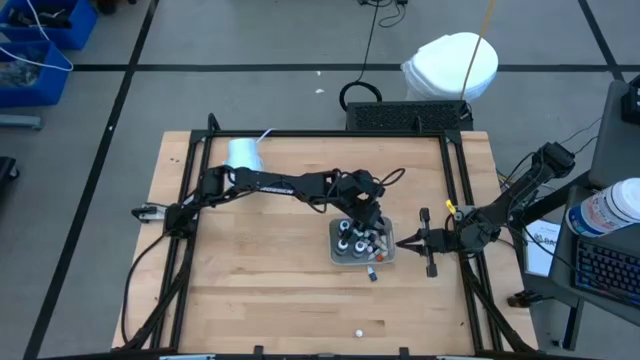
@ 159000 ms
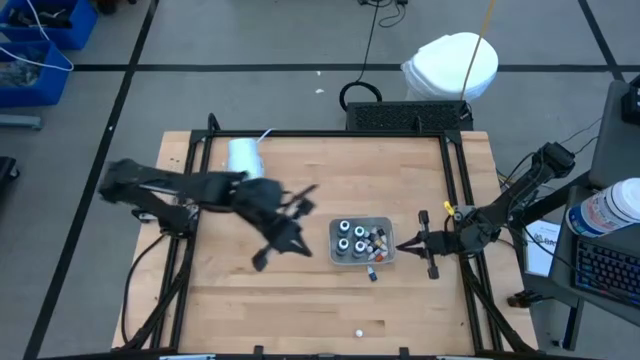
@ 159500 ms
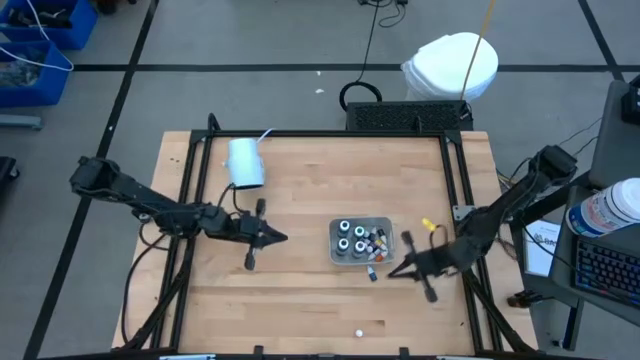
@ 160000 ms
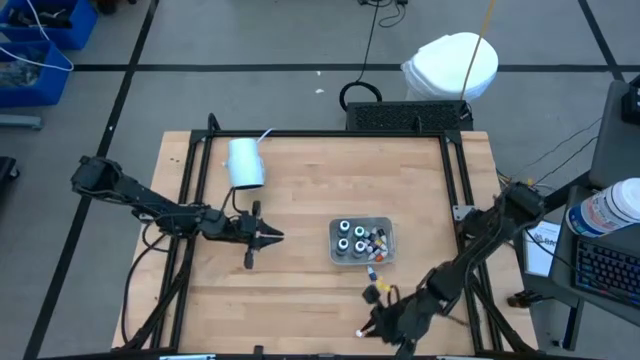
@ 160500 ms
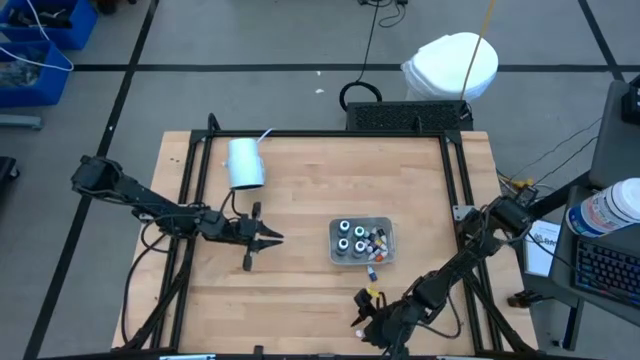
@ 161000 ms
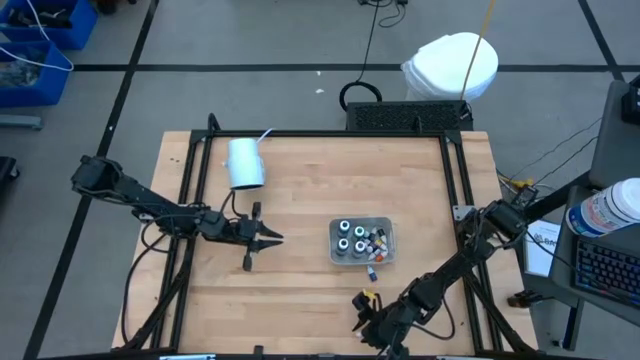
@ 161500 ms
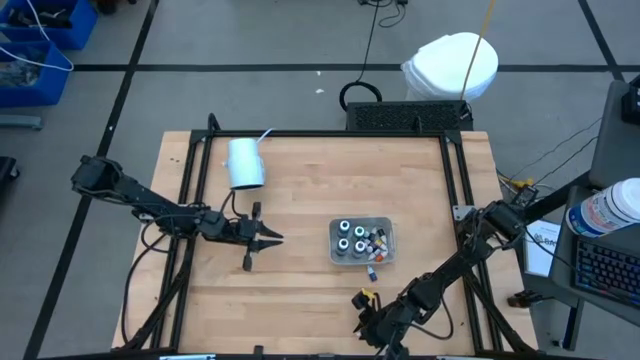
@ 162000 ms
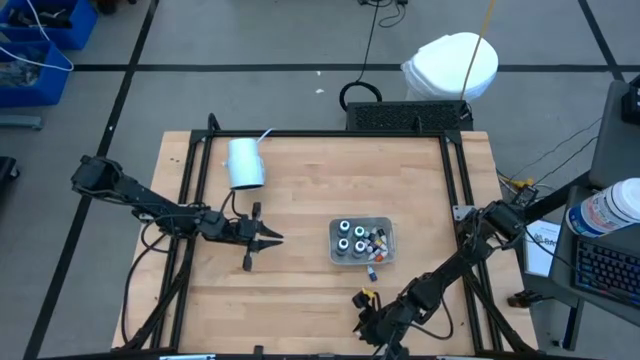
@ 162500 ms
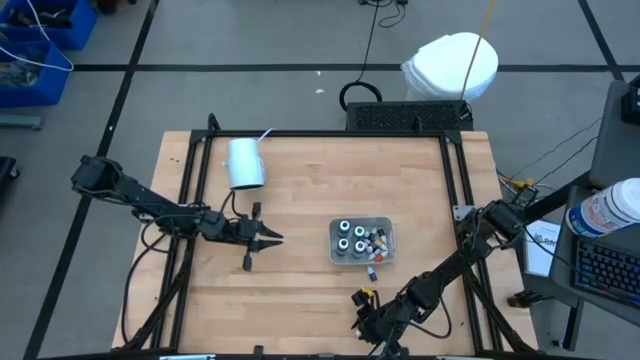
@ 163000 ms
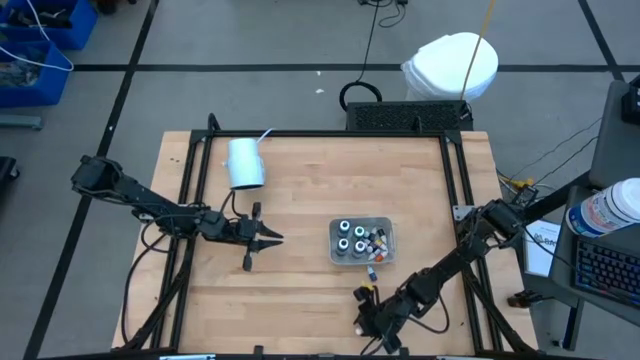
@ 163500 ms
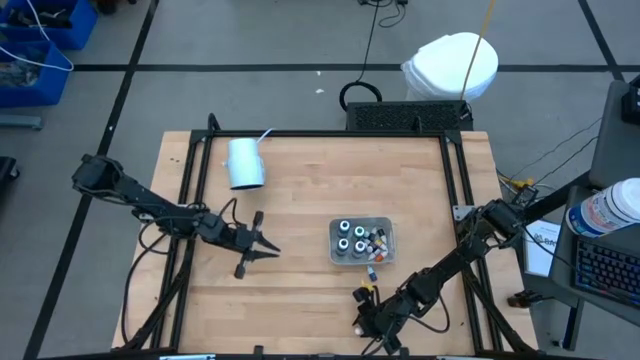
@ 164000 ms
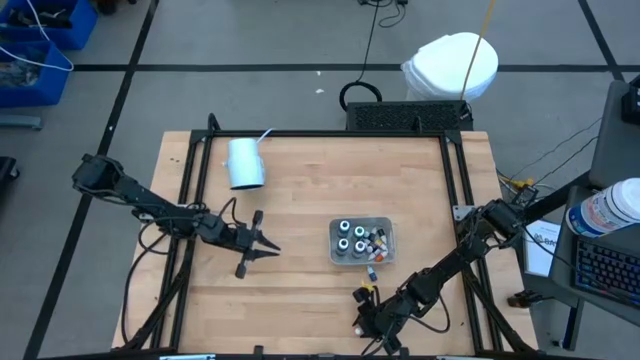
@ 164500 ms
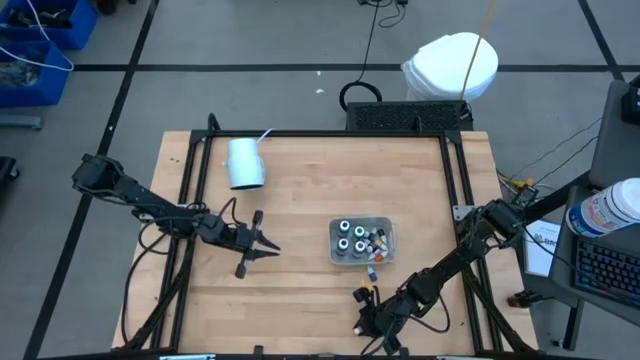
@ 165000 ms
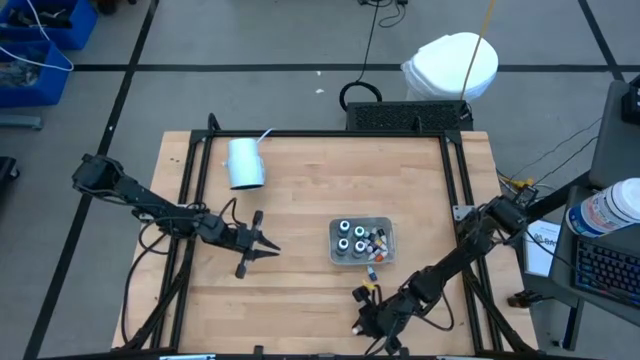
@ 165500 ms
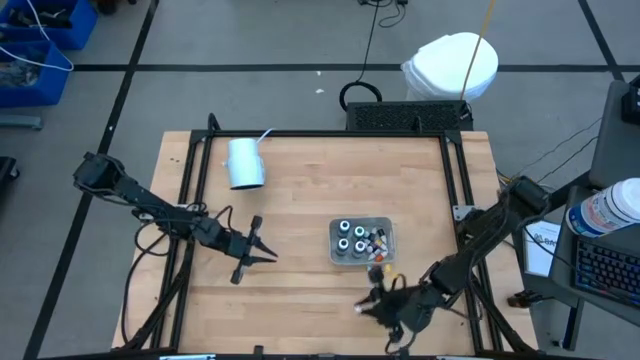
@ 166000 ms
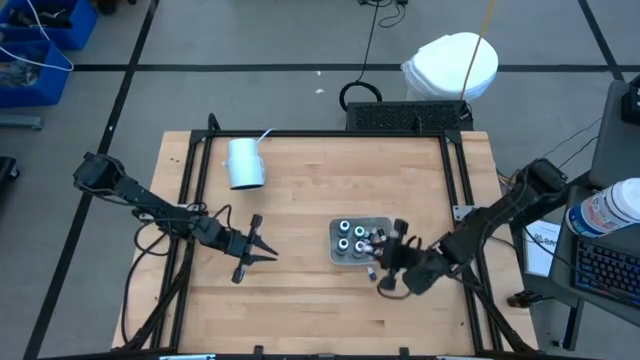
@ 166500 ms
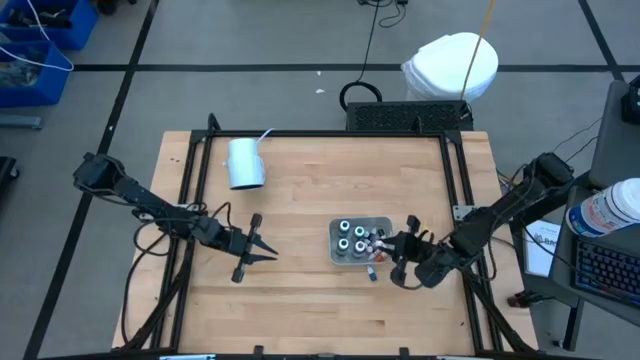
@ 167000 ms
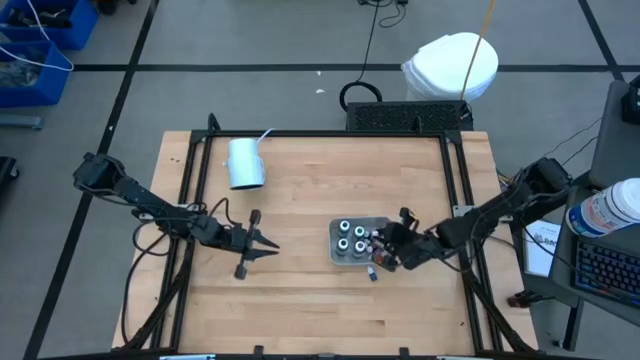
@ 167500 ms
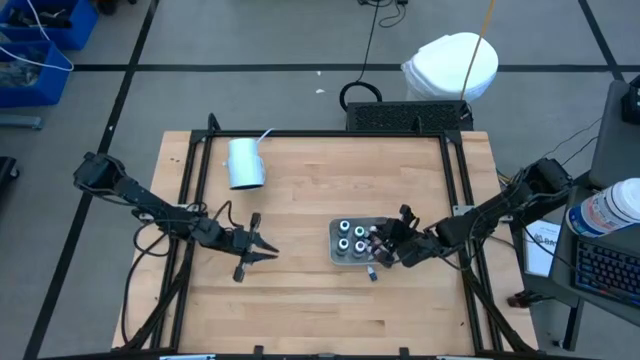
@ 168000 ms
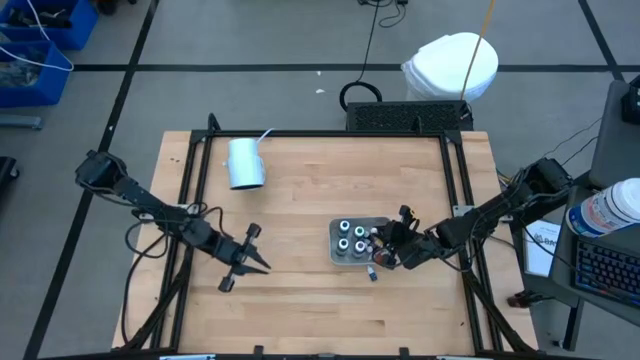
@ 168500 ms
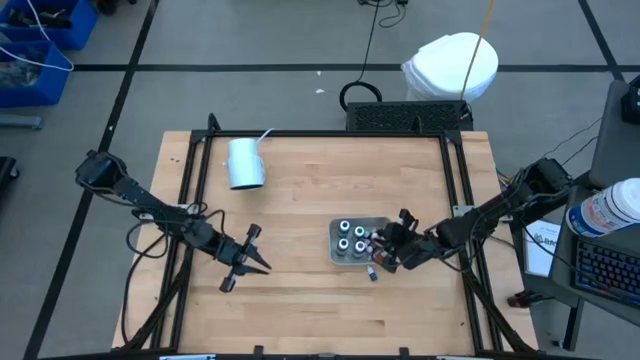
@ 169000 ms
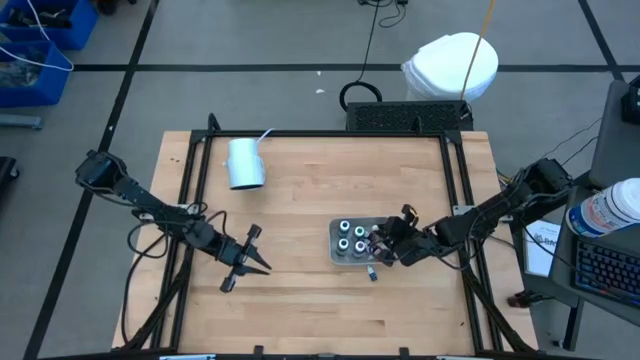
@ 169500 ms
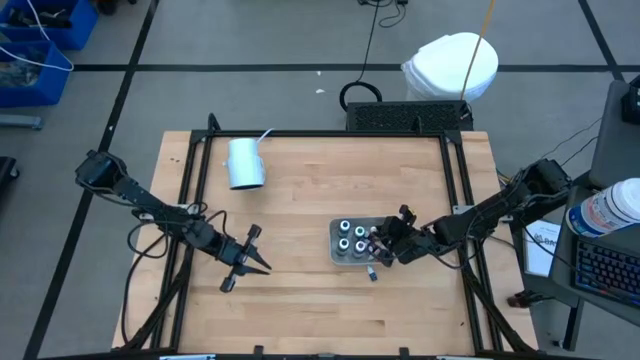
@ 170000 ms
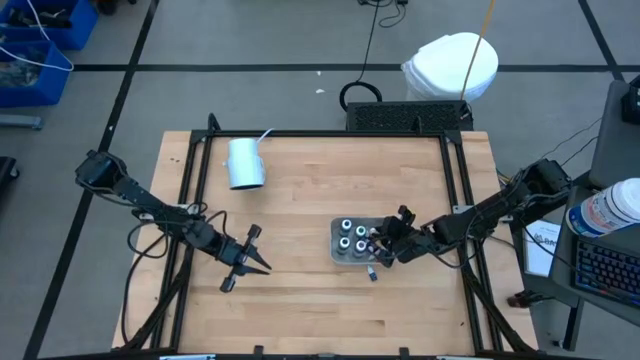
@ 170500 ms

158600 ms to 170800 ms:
Task: Pick & Place food coloring
Put the orange food coloring bottle into the gray bin

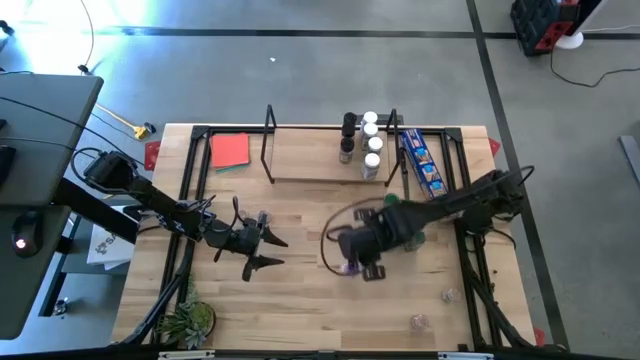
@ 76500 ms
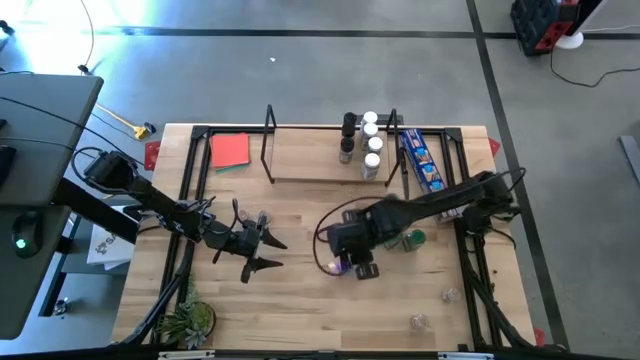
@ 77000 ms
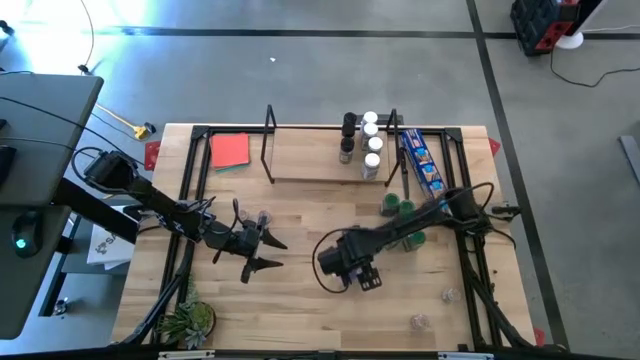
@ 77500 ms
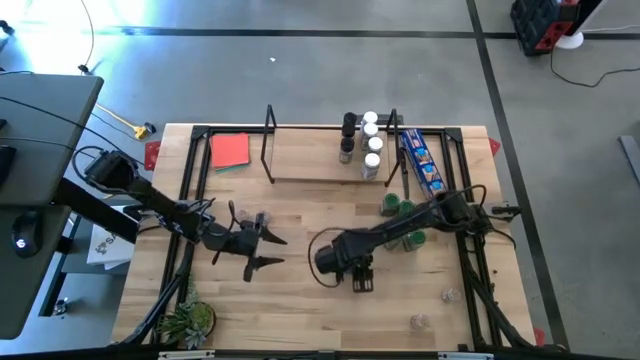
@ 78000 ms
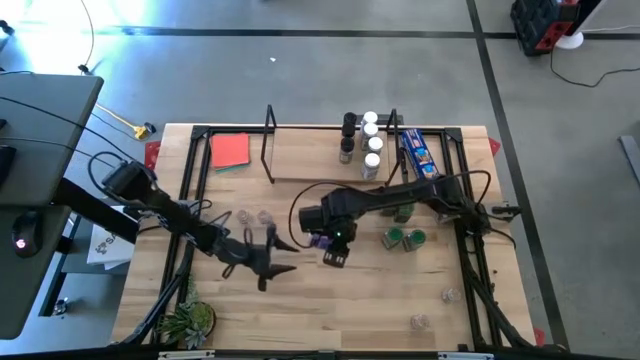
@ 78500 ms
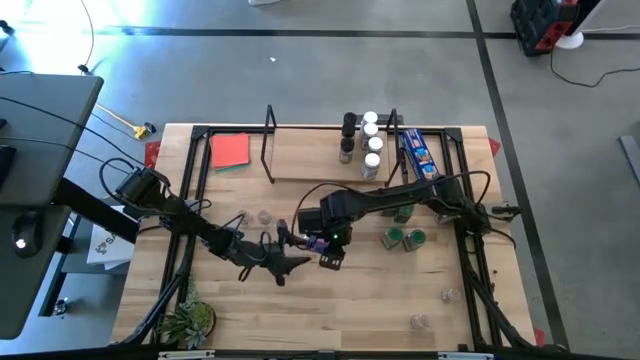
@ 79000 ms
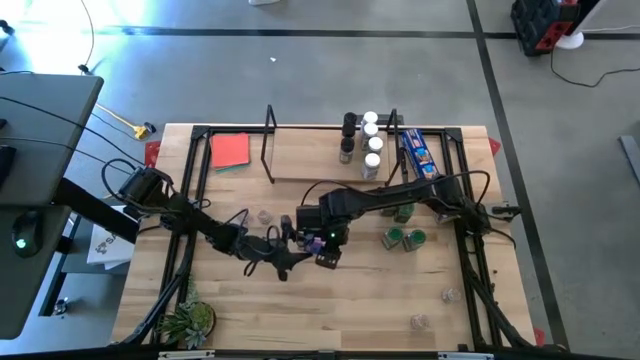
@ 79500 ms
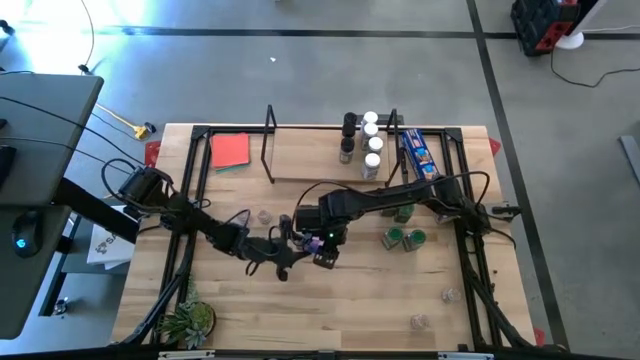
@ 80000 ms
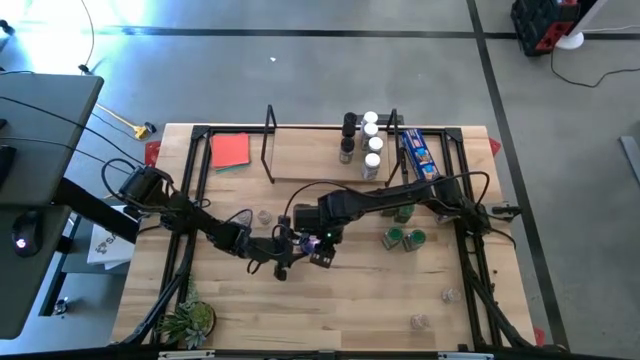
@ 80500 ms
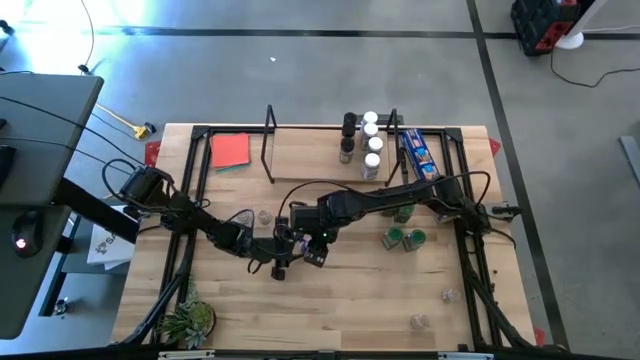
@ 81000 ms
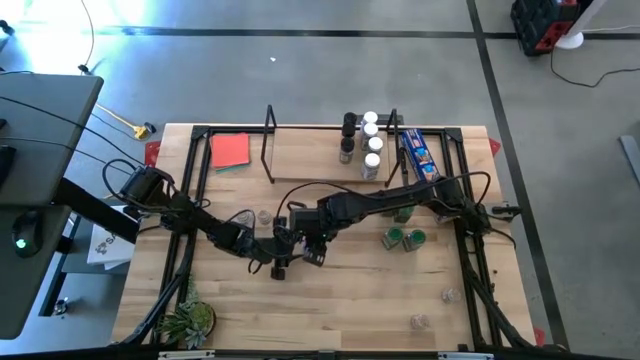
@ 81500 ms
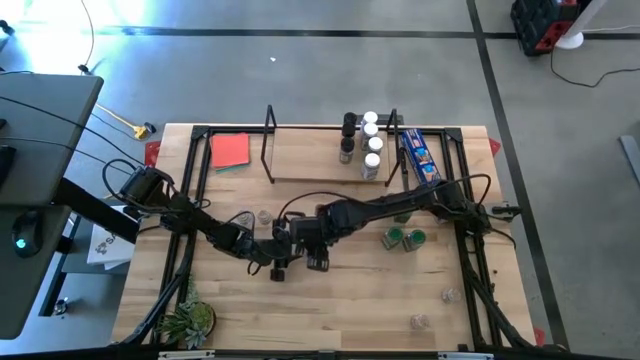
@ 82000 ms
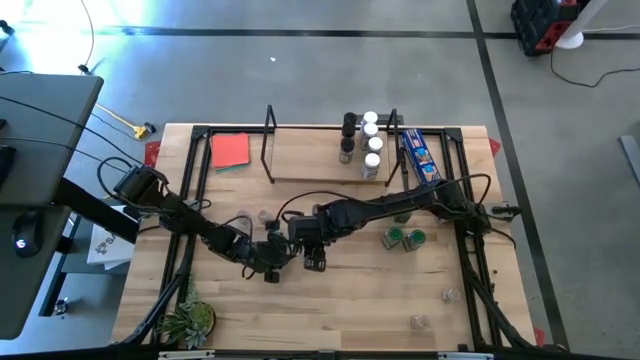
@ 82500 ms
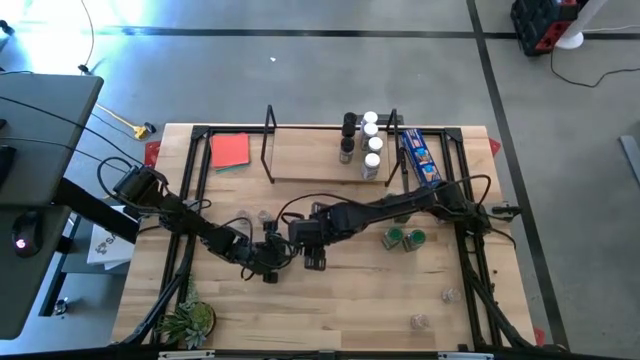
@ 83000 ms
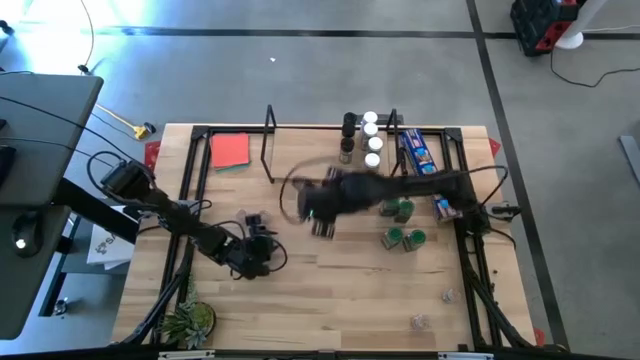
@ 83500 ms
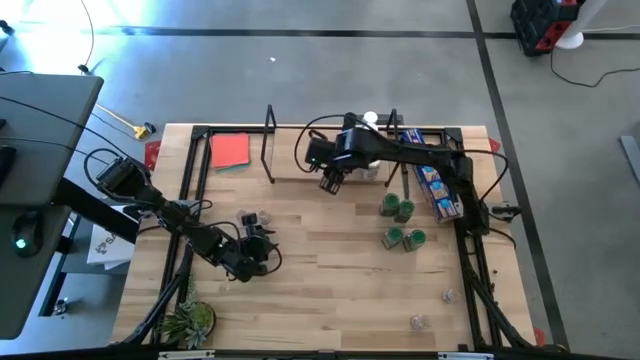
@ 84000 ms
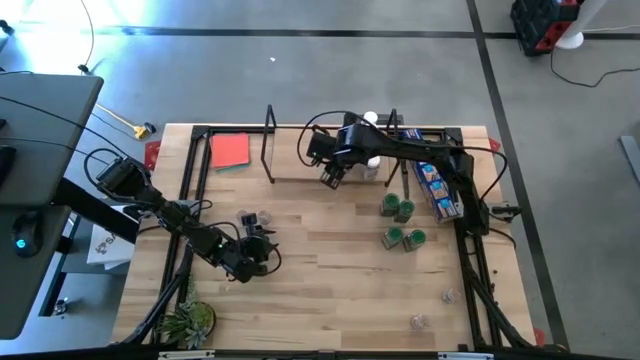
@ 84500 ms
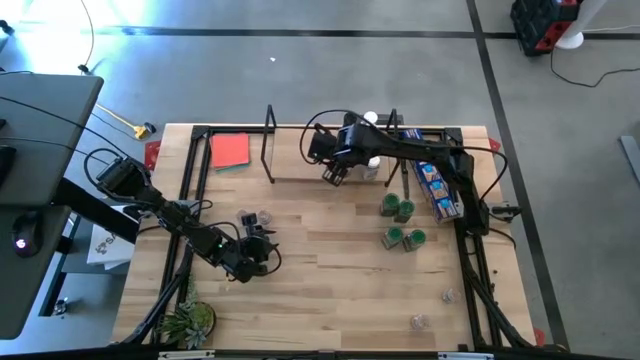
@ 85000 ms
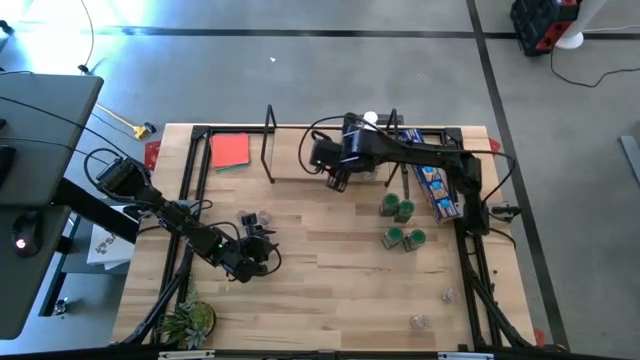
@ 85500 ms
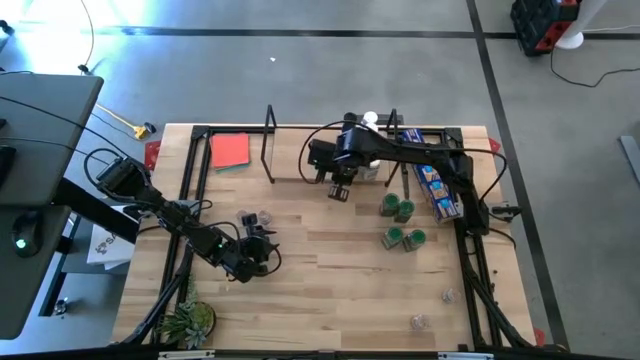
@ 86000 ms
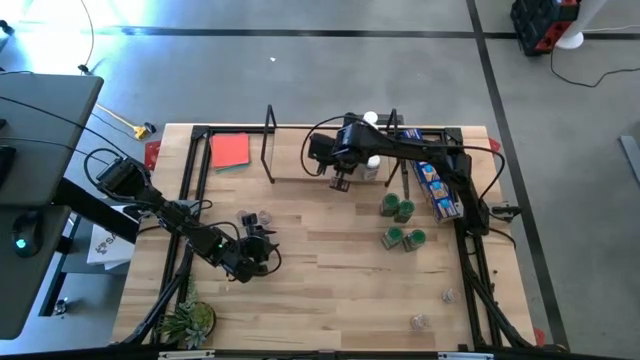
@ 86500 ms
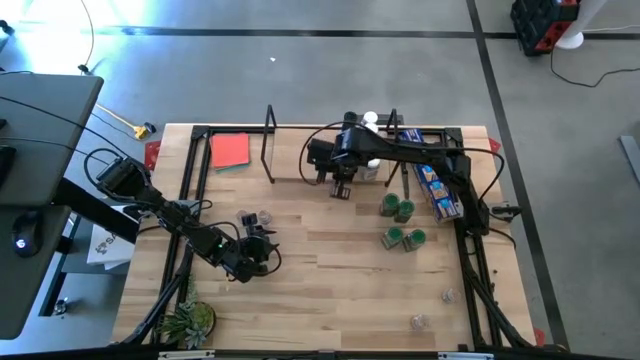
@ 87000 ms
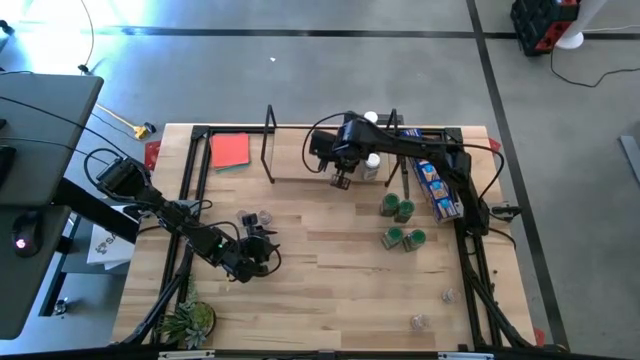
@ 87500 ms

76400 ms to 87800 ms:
Task: Shelf spices
Put the top black seasoning bottle on the shelf aligned with the other black seasoning bottles
